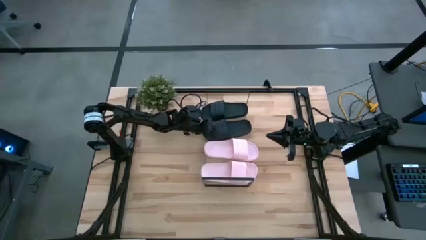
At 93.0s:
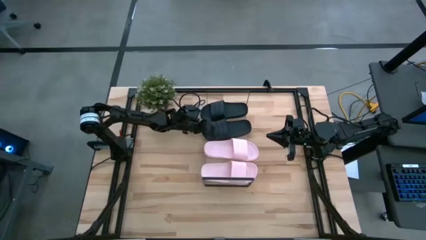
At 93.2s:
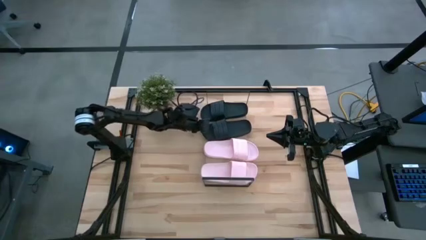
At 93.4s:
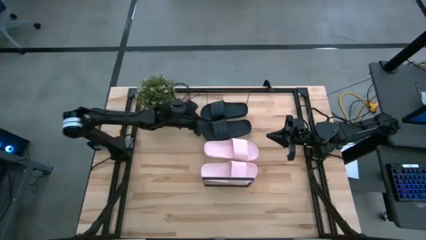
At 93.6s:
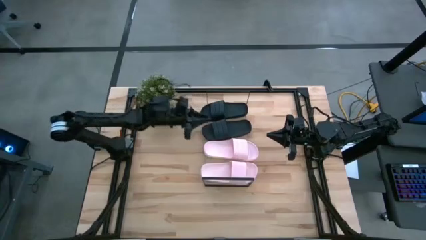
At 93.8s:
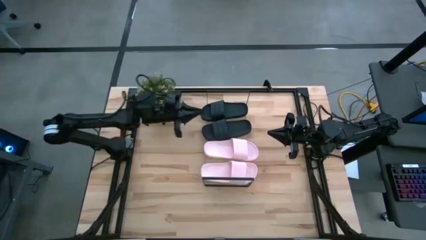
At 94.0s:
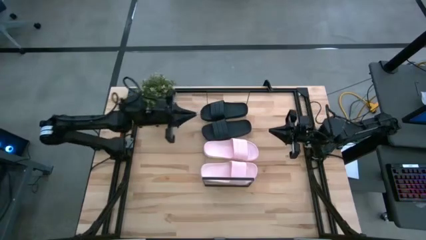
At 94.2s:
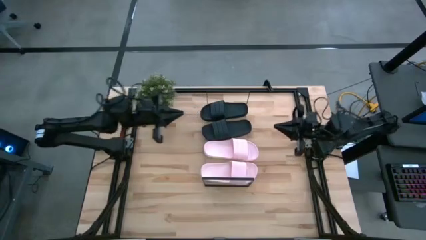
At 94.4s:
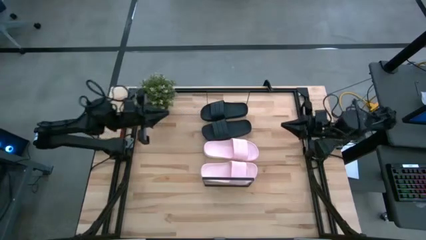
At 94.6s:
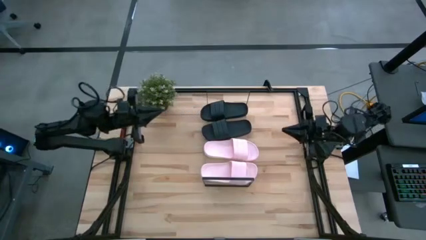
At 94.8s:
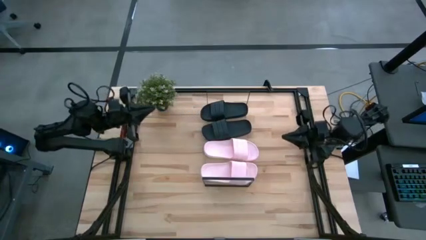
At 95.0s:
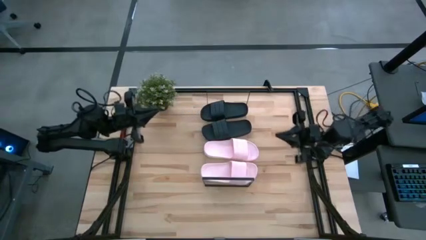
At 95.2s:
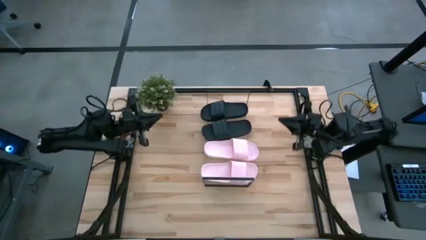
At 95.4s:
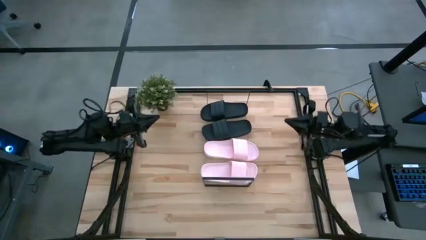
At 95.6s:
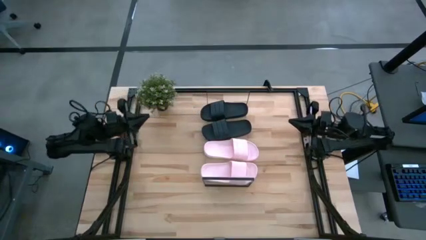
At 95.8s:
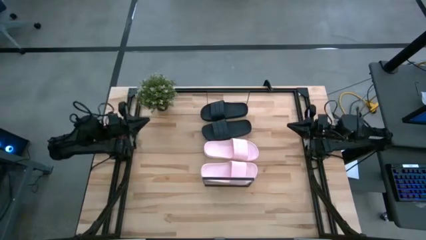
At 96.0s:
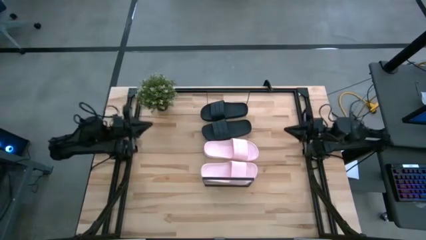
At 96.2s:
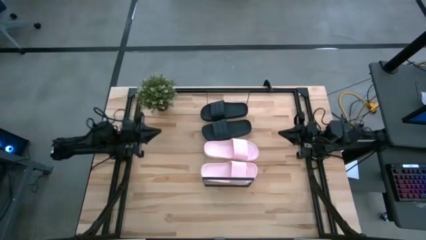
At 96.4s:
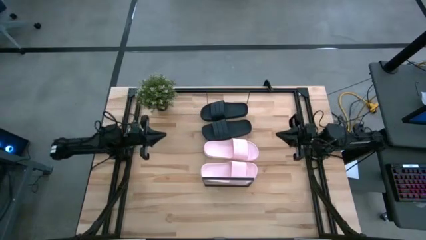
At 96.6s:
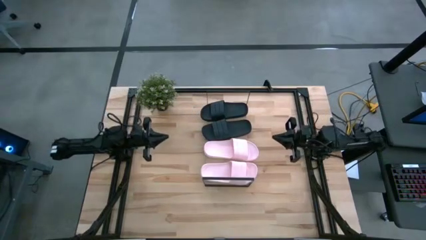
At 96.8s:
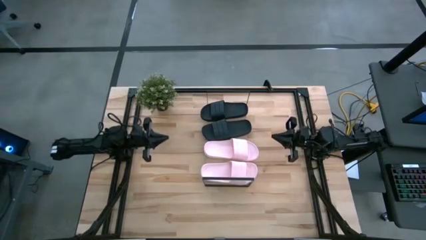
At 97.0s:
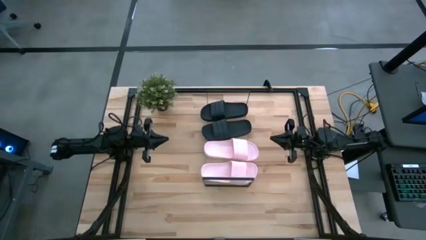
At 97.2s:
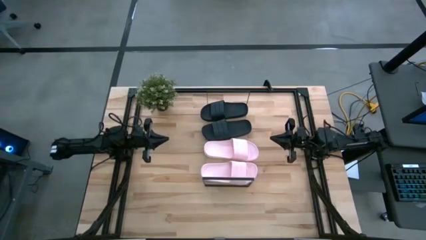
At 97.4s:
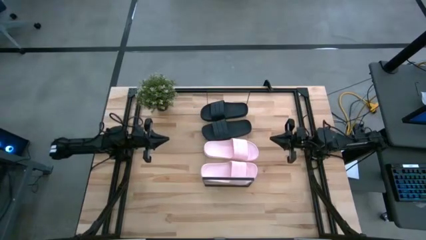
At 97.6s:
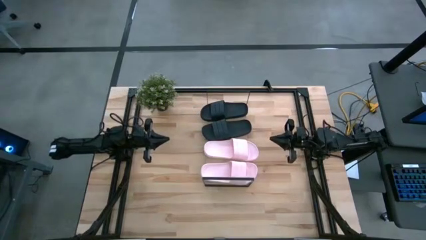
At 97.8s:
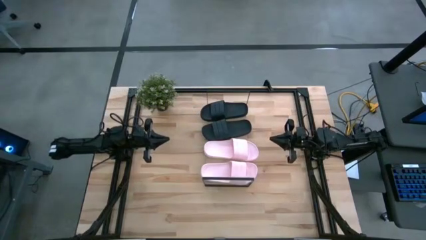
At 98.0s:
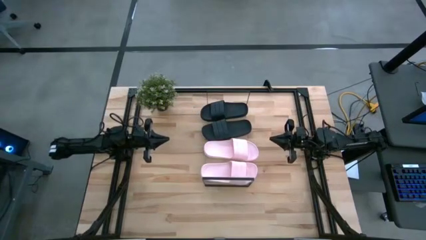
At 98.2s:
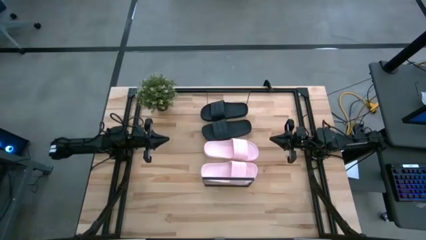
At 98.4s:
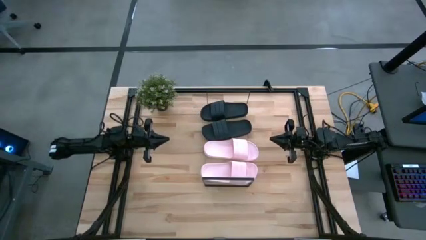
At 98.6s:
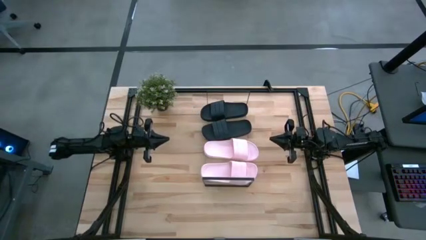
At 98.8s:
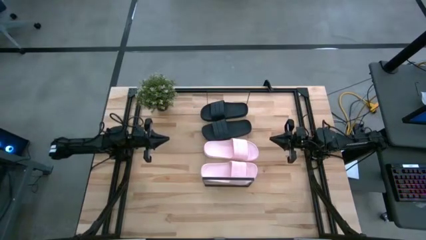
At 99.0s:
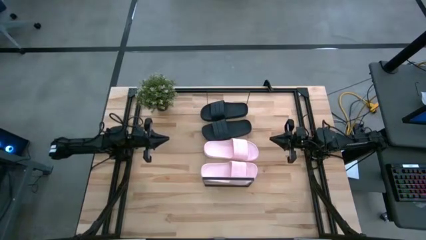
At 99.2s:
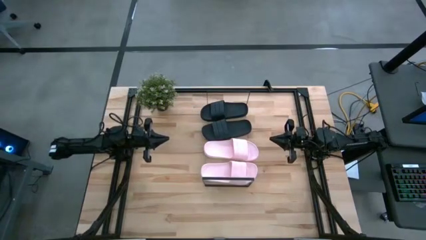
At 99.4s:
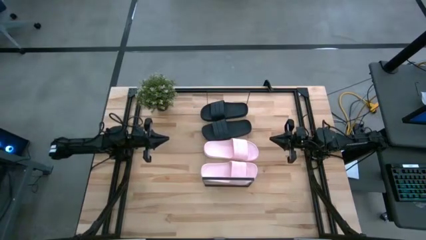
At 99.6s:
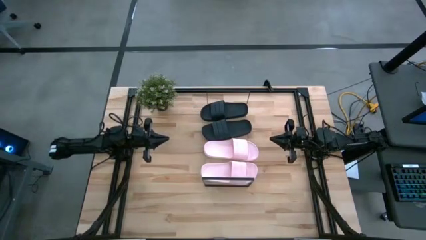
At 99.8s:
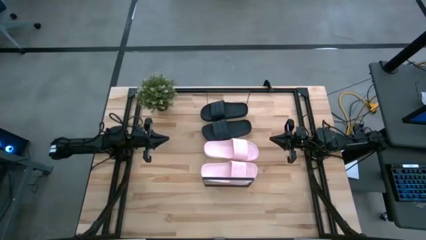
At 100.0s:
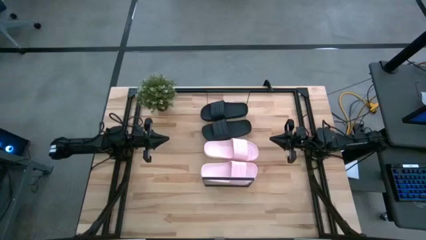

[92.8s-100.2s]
Task: Pick and place slides into the shelf
Return to Home Position

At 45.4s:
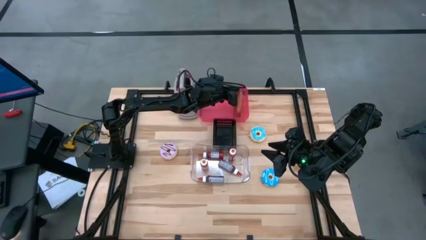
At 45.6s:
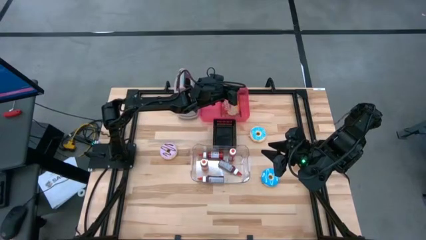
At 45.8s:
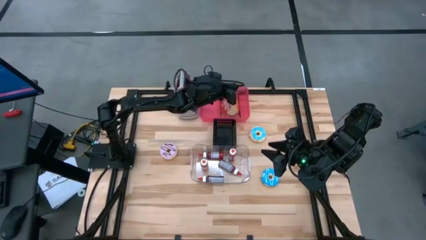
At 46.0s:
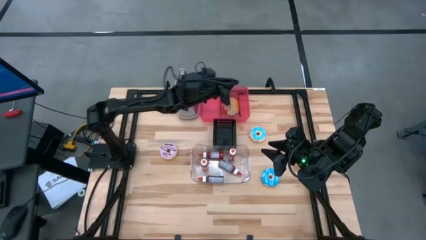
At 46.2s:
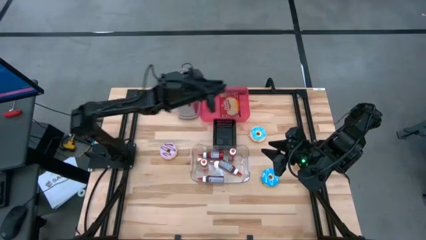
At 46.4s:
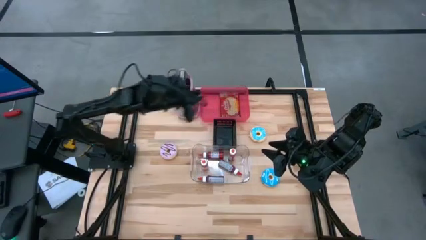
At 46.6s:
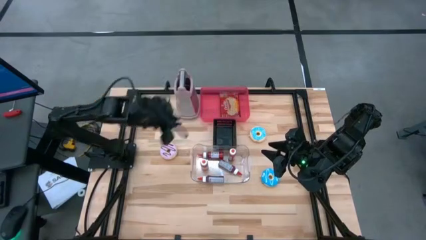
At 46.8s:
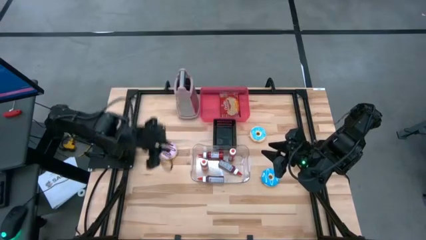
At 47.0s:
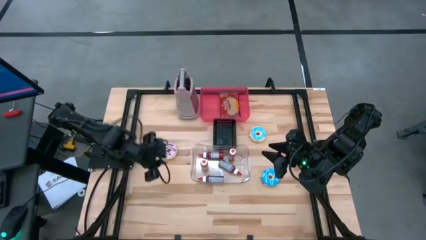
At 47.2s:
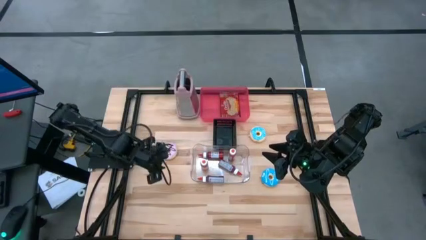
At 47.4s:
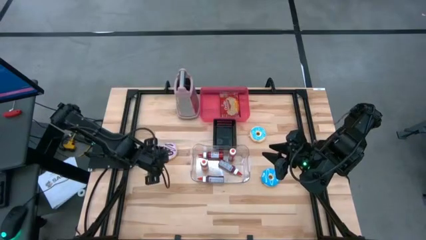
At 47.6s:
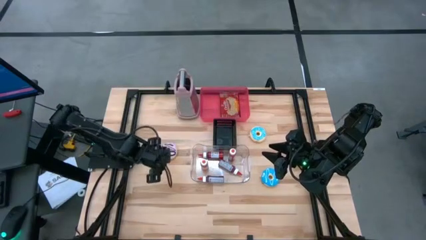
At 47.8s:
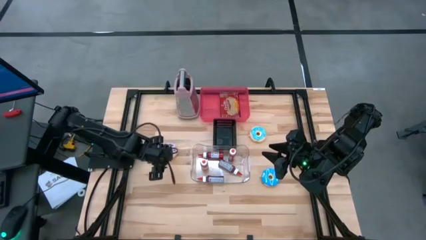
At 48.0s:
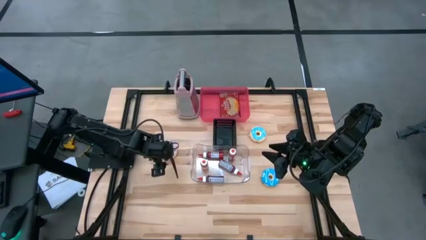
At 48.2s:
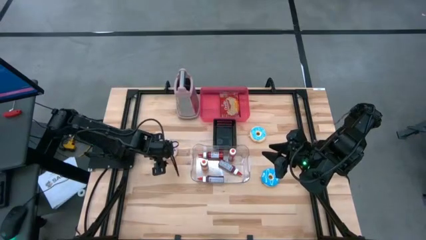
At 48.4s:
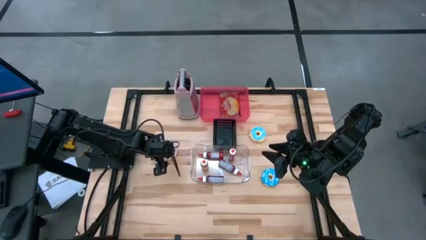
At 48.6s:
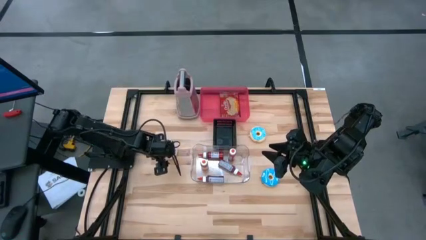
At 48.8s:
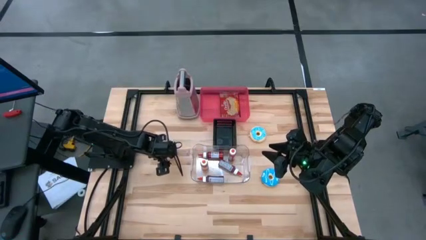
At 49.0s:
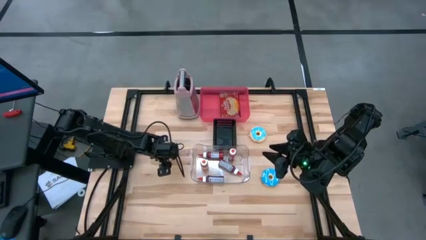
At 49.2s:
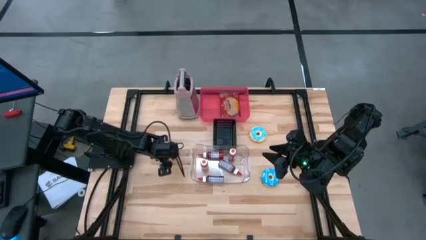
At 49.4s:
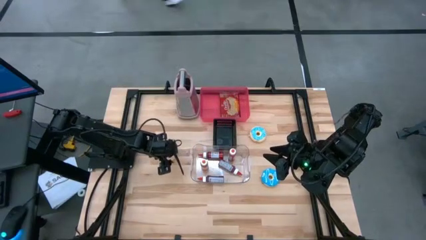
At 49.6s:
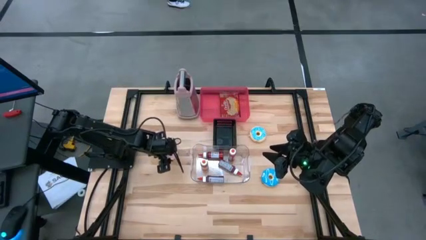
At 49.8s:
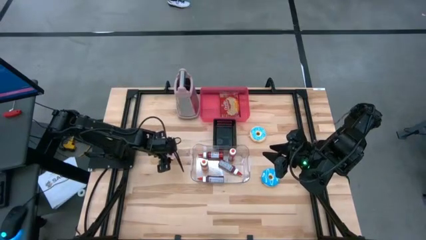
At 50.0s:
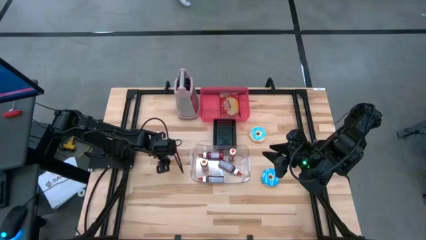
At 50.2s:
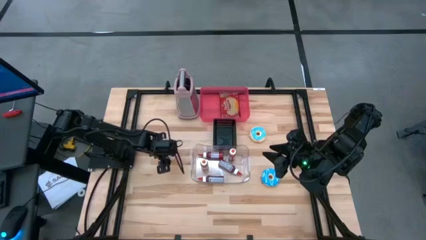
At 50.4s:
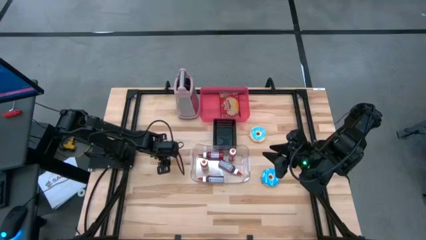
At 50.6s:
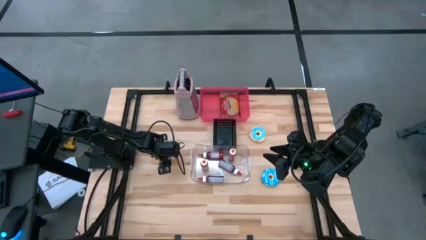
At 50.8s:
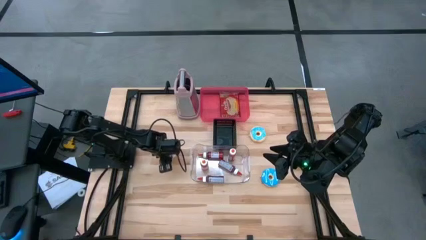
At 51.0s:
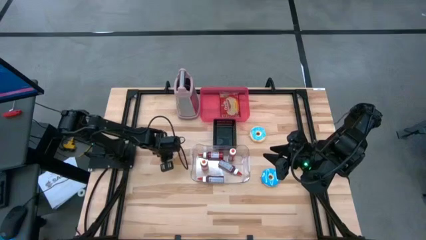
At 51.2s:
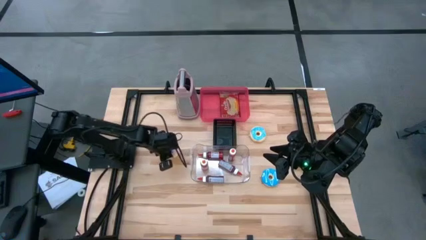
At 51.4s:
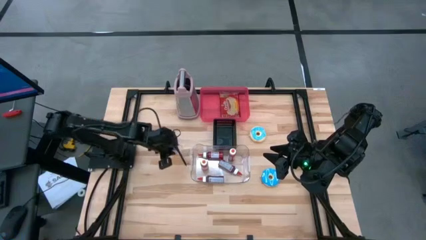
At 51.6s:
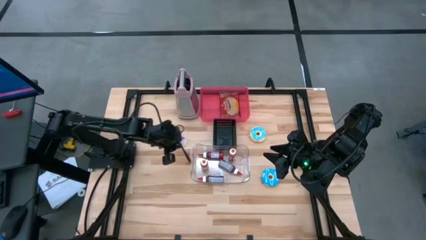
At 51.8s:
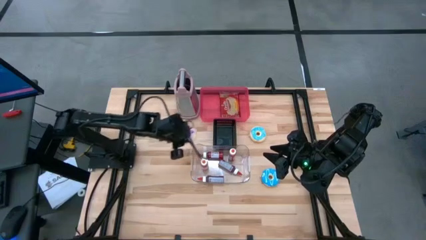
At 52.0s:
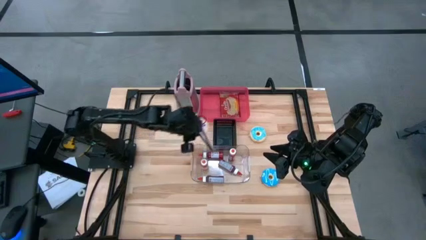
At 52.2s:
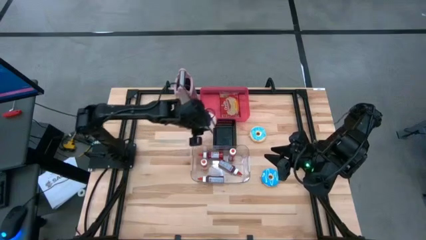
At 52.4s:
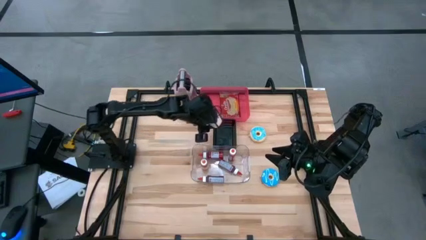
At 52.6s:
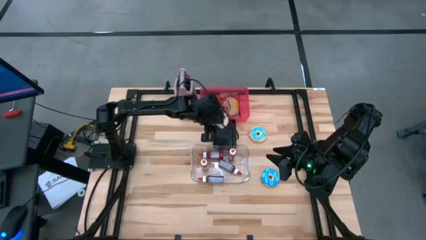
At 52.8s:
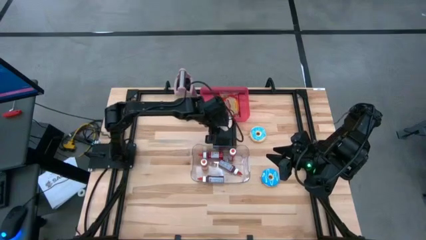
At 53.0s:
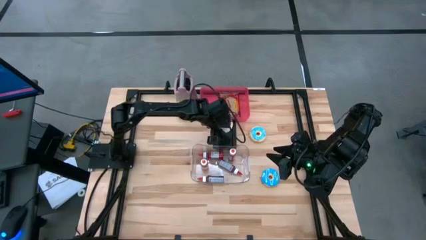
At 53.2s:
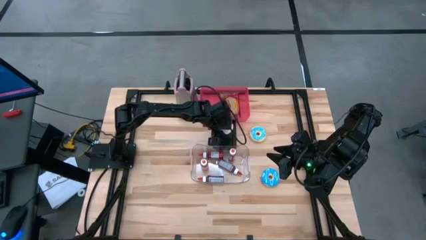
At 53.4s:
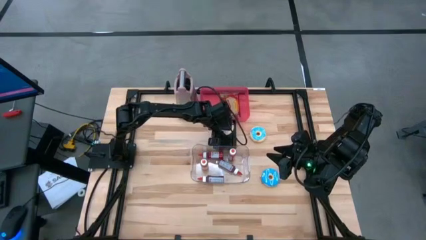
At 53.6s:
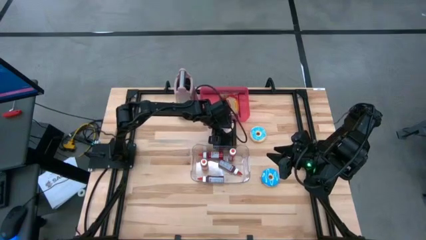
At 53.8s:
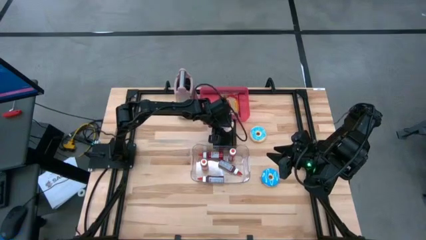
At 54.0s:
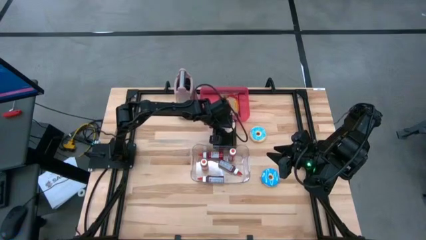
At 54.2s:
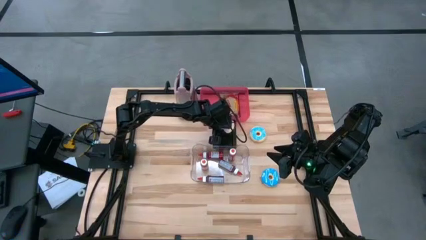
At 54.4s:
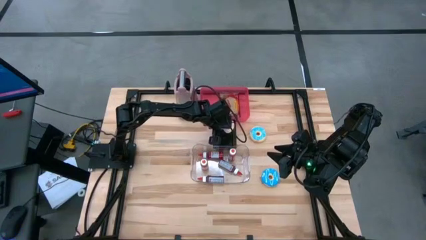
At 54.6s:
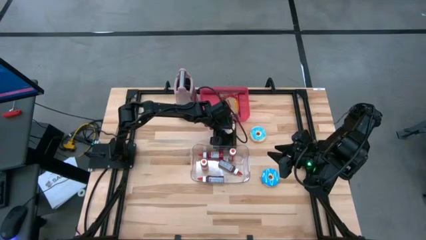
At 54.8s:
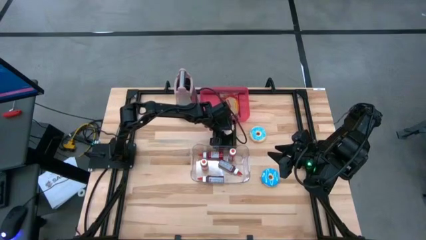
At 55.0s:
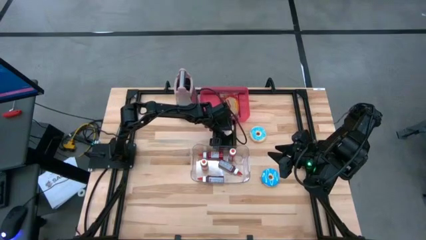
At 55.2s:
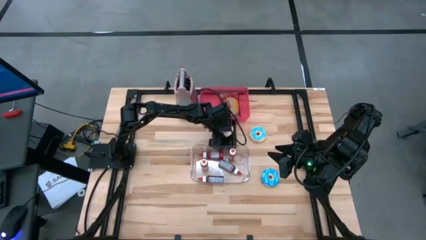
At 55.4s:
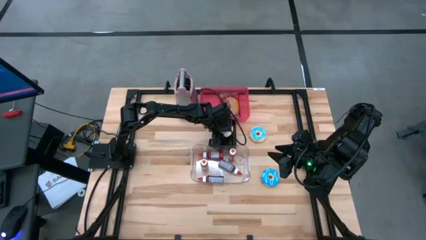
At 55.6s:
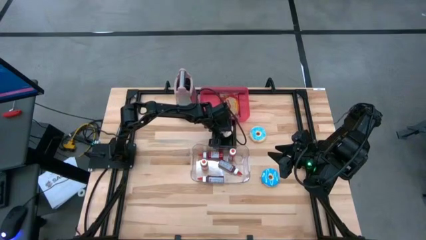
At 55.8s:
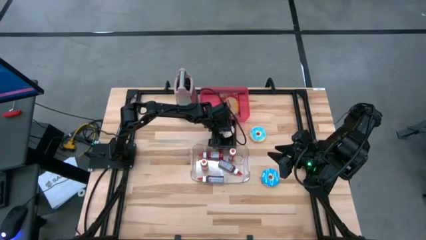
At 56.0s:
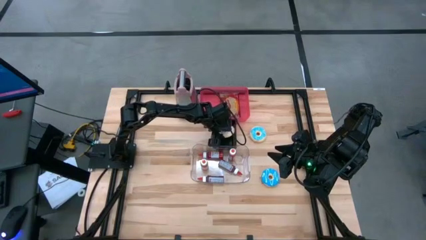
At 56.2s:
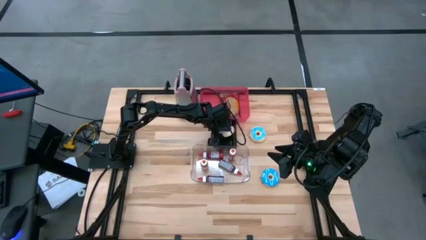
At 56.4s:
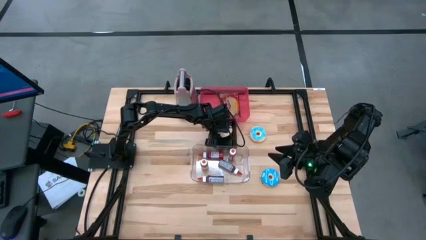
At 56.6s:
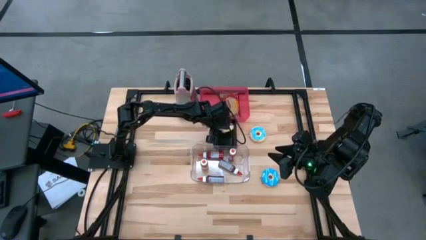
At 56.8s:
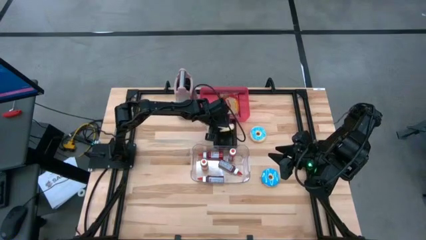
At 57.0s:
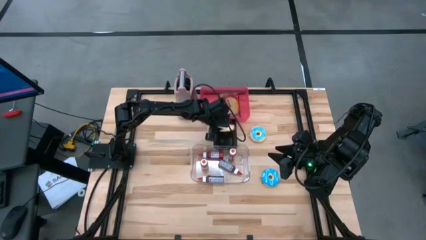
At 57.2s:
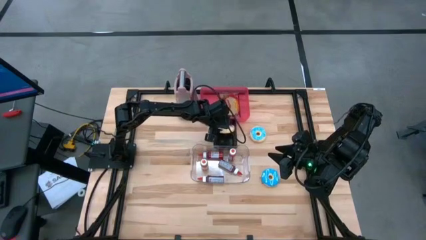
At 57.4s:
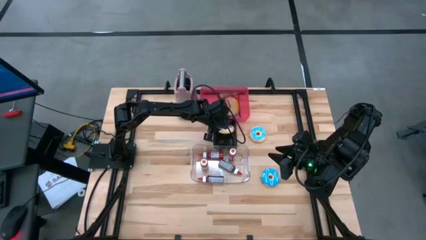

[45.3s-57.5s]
Task: Pick & Place Food Item
Put the pink donut into the black bin
